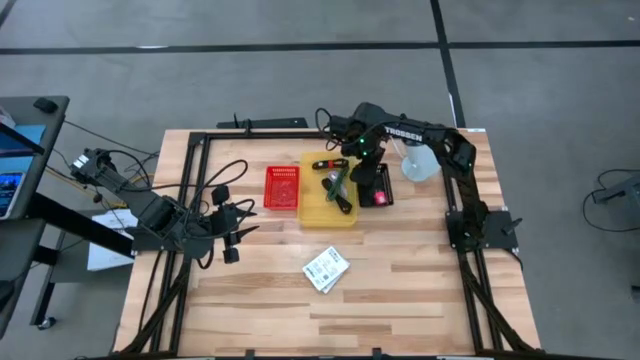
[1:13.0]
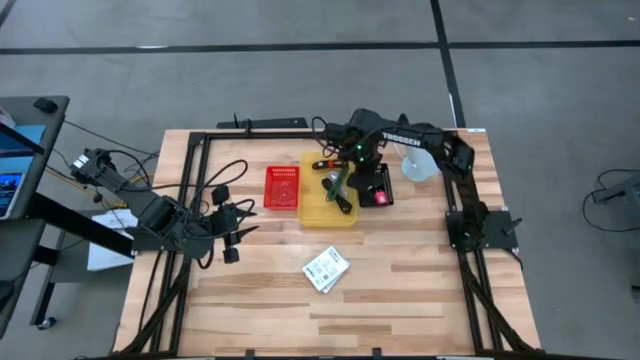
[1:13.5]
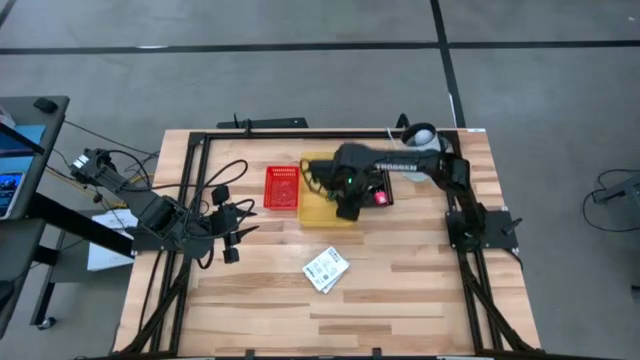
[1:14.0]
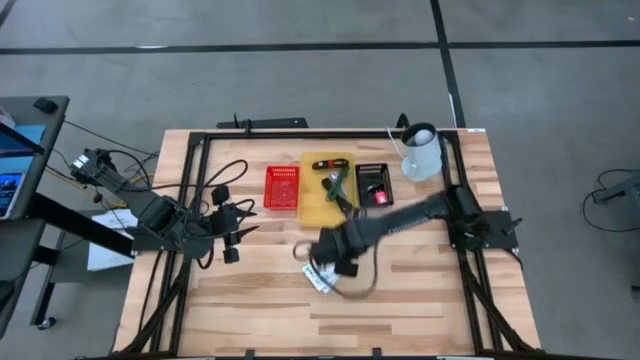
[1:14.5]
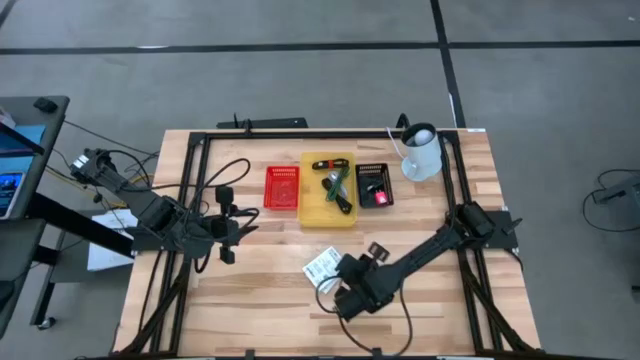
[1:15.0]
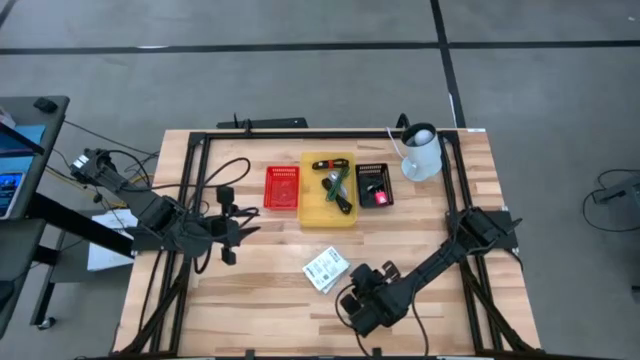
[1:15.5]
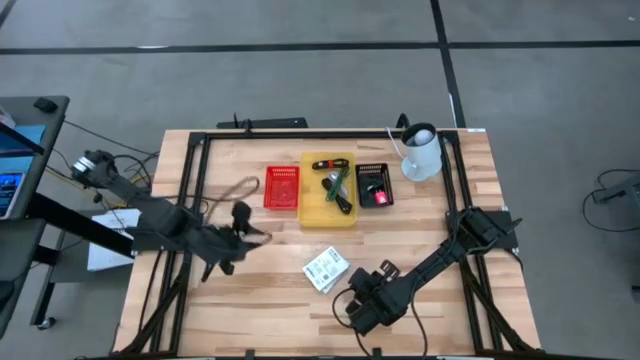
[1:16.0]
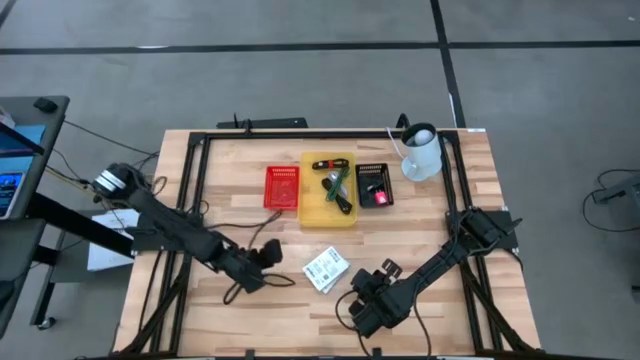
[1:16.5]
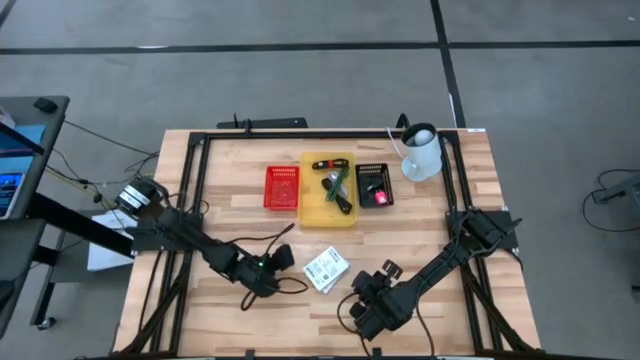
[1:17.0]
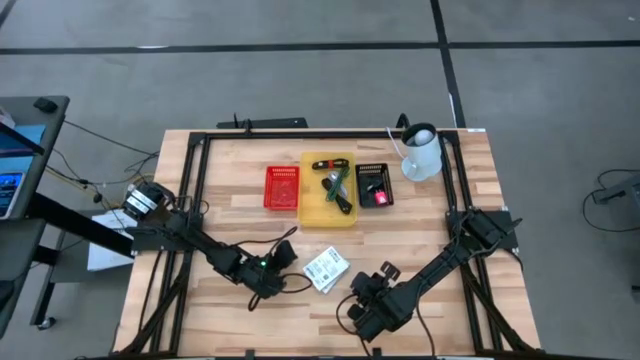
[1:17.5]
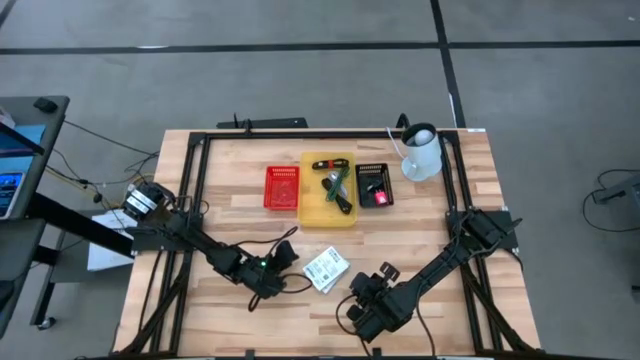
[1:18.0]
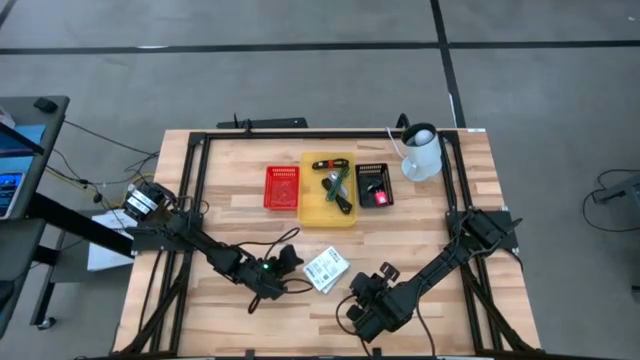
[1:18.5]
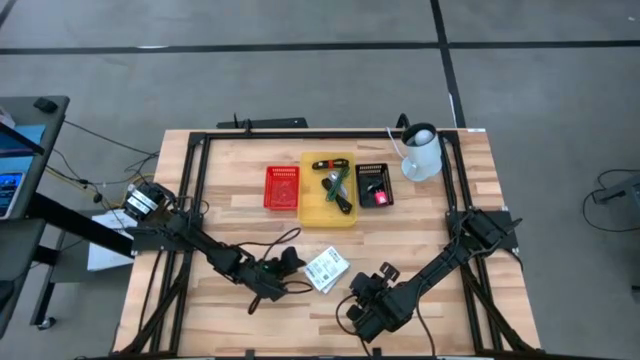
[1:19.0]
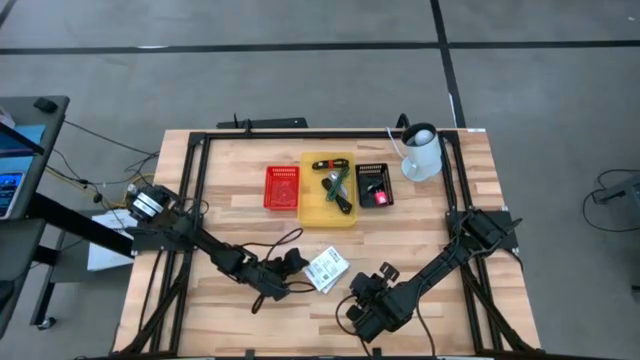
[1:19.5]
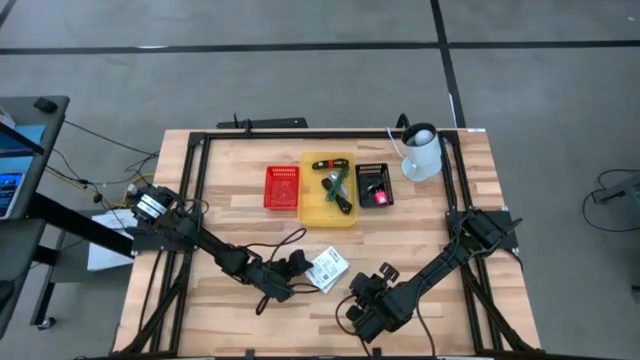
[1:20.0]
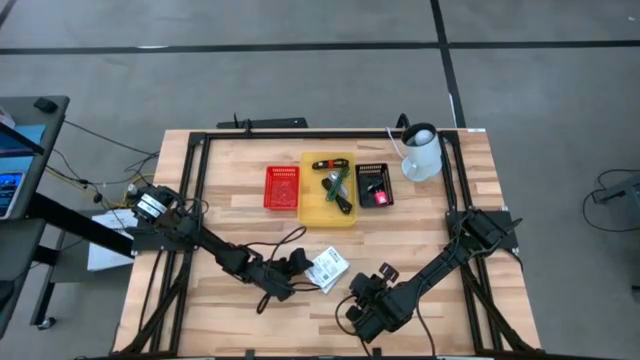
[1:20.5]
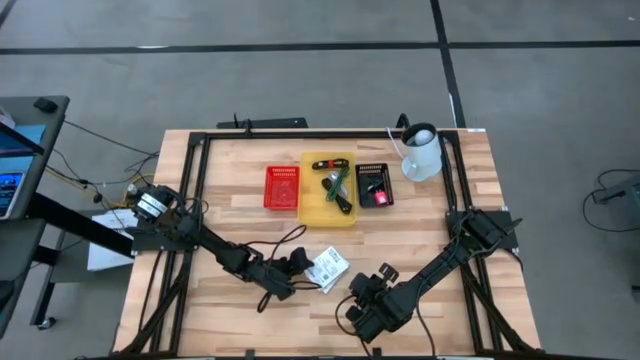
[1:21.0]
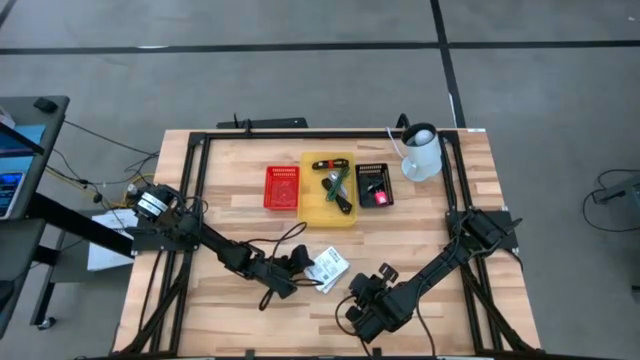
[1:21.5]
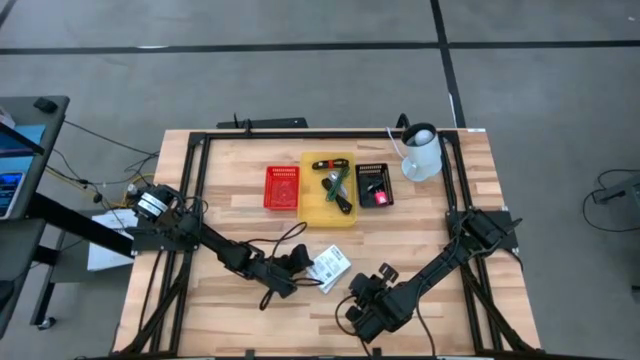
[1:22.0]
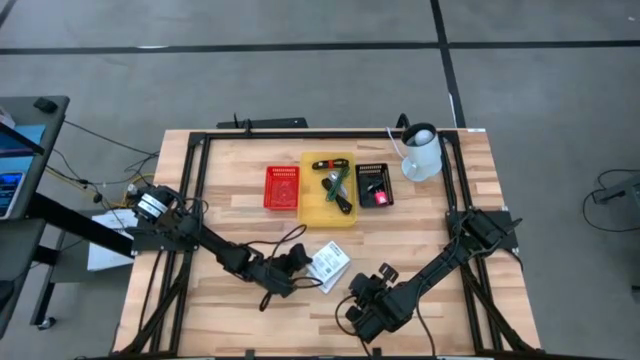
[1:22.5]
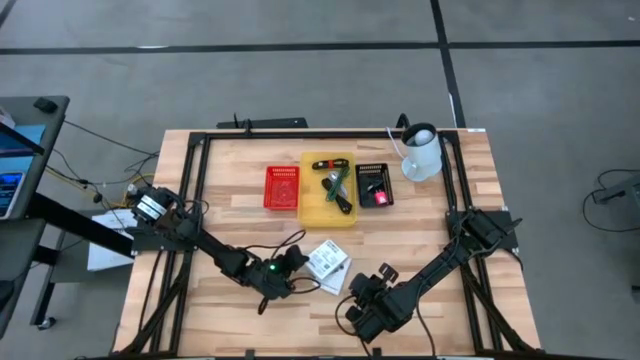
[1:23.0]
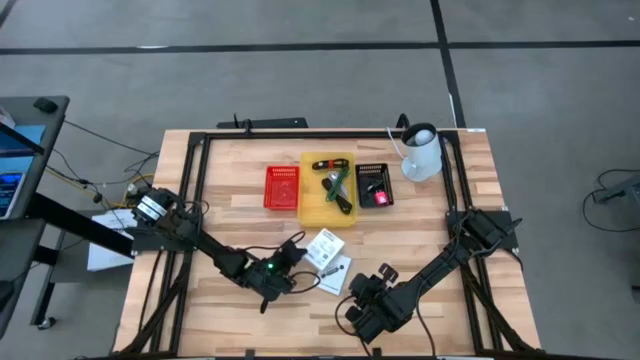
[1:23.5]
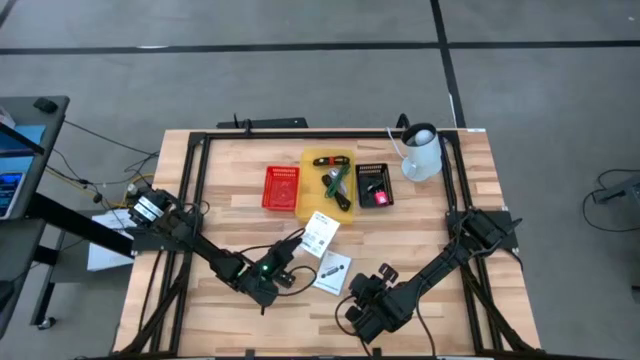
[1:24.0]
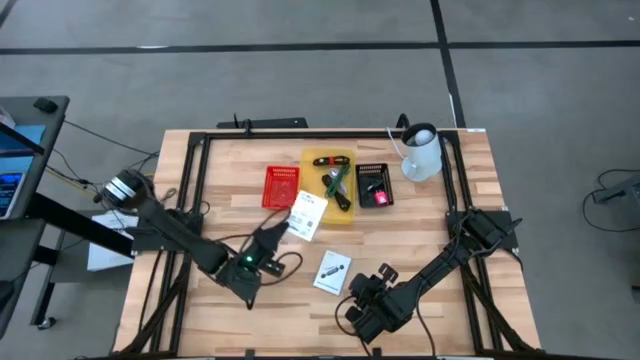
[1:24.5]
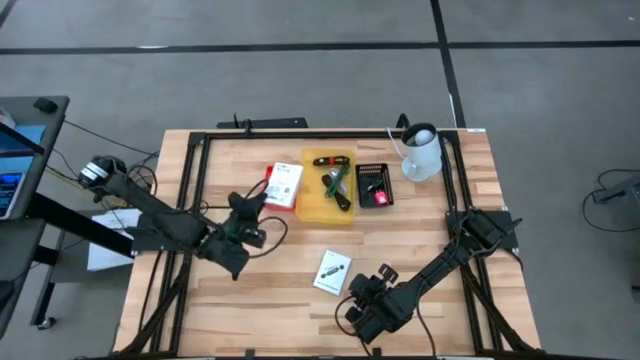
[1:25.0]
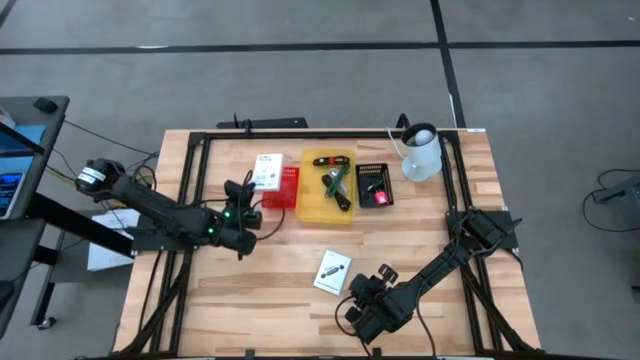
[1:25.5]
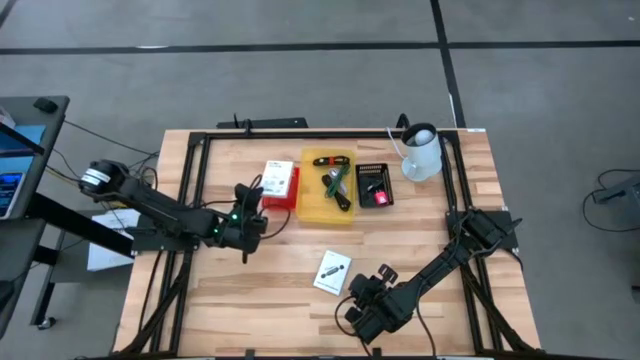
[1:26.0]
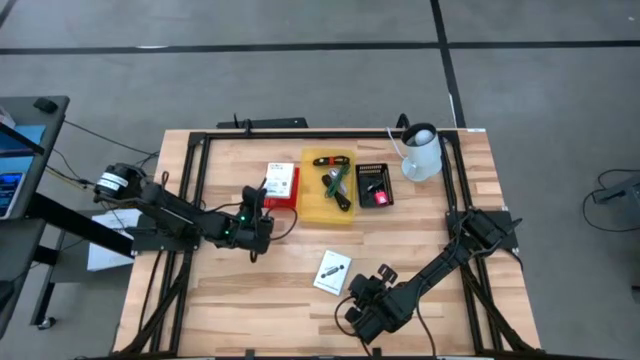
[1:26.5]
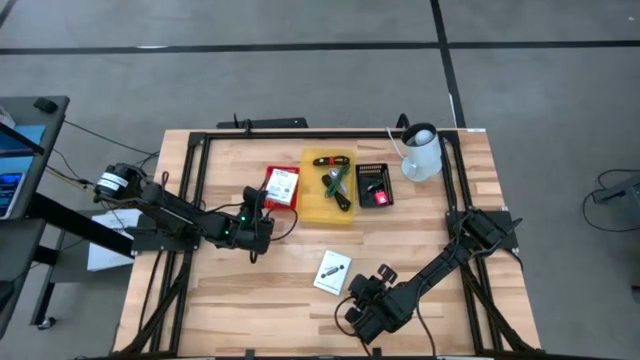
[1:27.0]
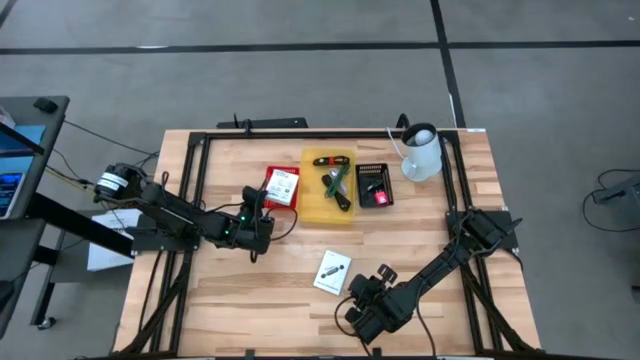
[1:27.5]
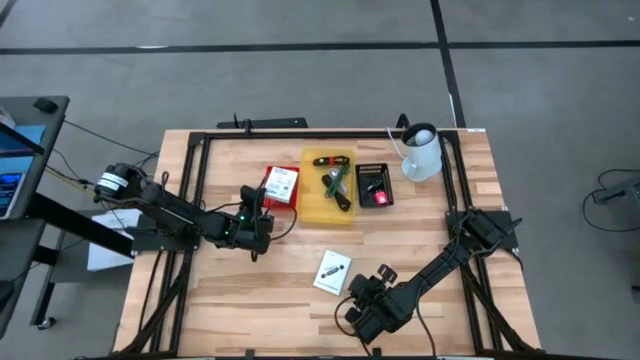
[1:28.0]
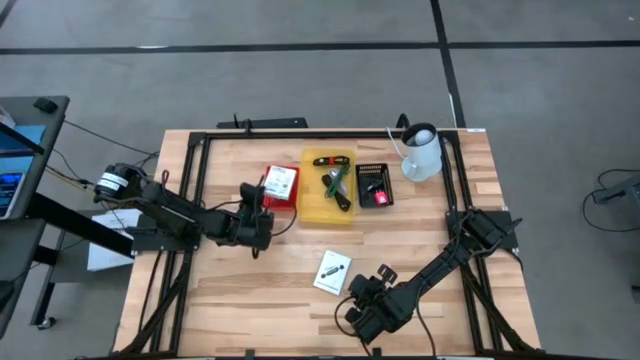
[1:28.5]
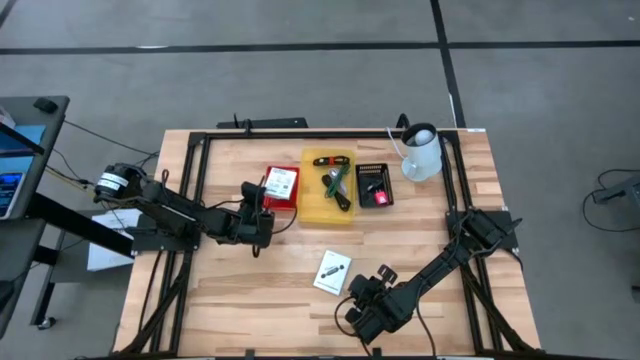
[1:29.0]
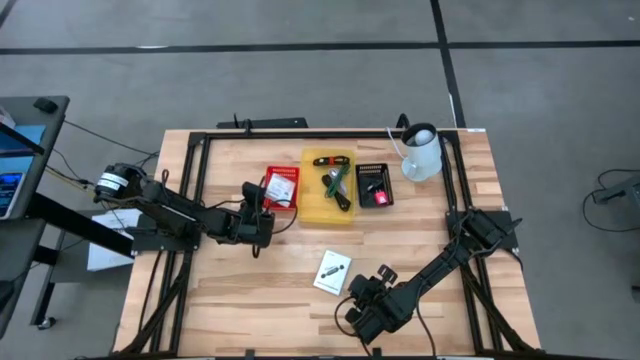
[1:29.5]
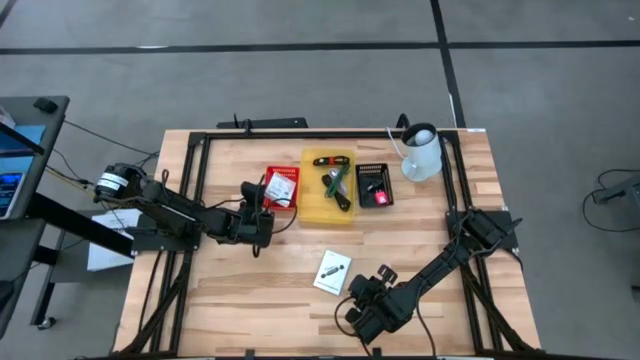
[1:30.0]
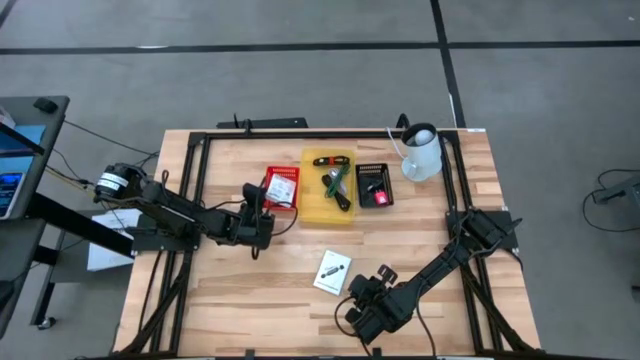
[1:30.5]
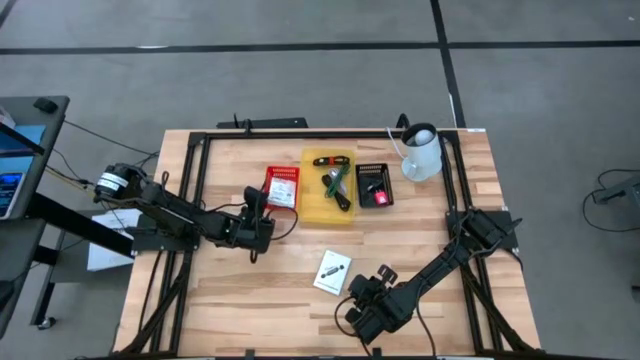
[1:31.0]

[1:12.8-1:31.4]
Task: Pick and place items into bin
Put the card reader box in the red bin

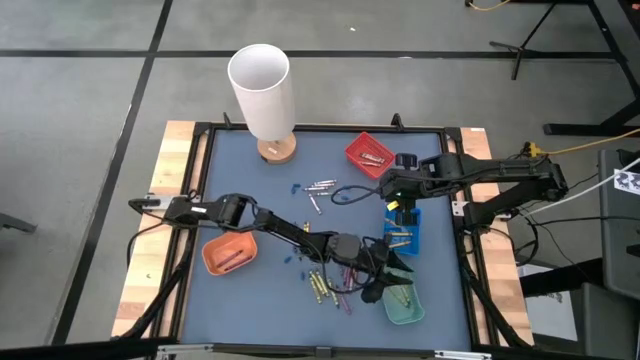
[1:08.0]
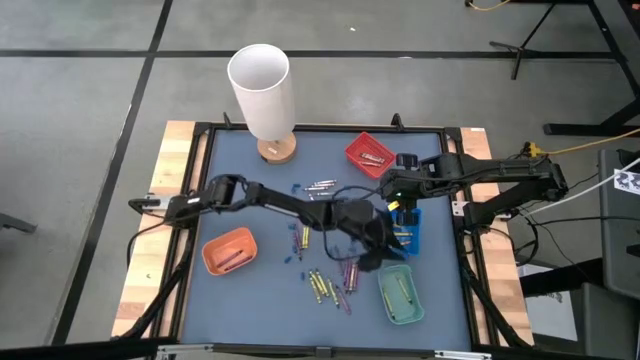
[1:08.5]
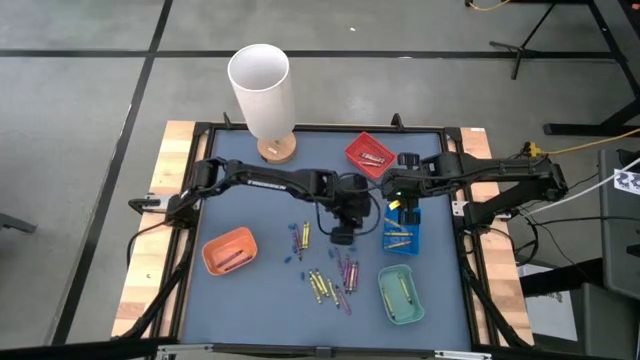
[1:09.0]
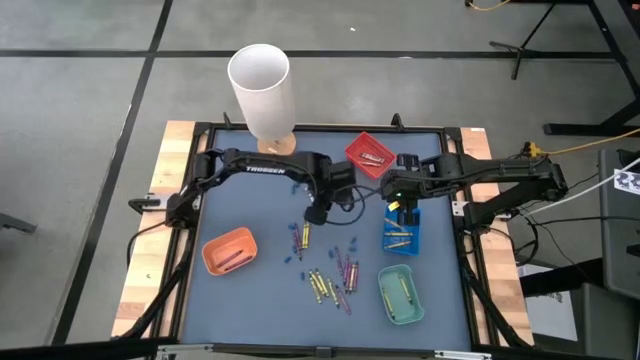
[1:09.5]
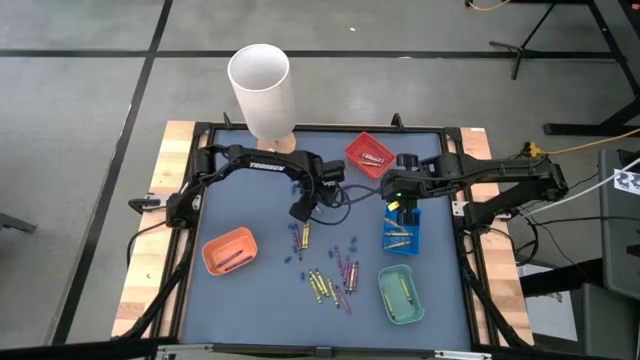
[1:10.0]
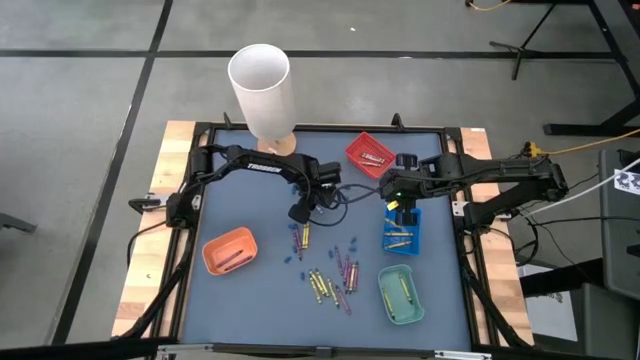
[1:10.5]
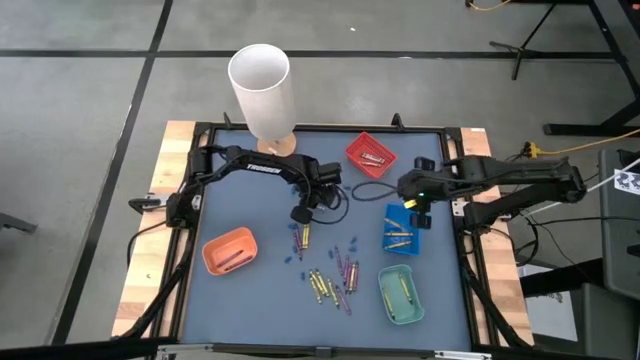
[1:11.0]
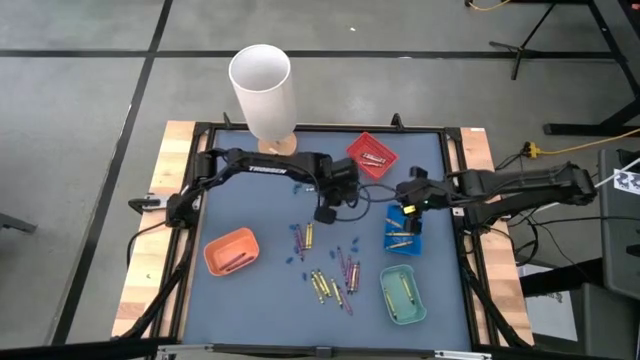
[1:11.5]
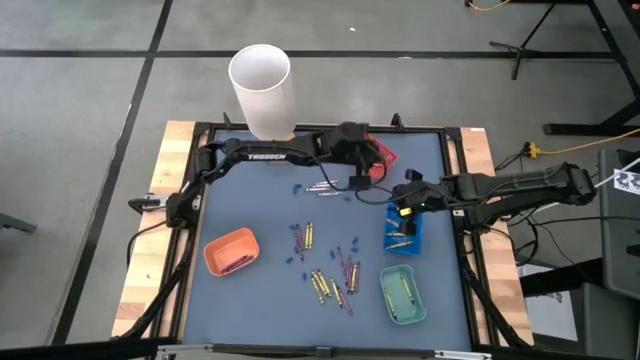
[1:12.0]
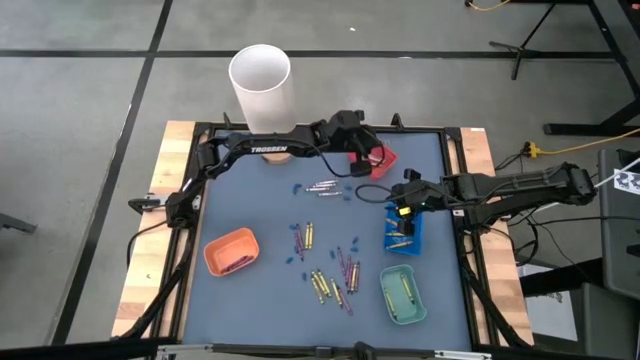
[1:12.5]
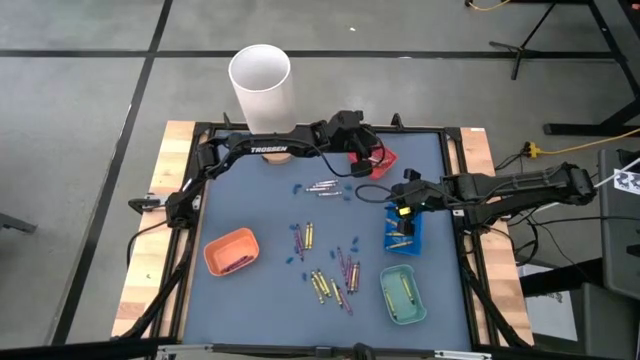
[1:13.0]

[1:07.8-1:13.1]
Task: Sort crayons
Put the grey crayon into the red bin
